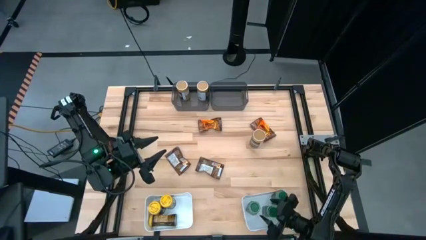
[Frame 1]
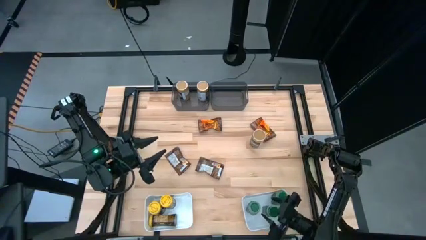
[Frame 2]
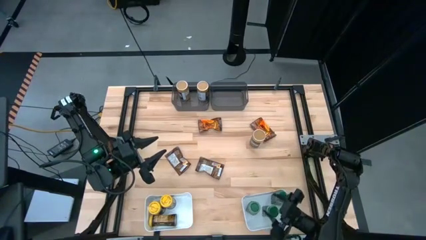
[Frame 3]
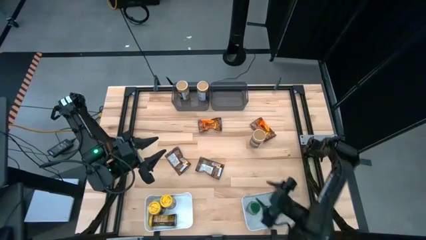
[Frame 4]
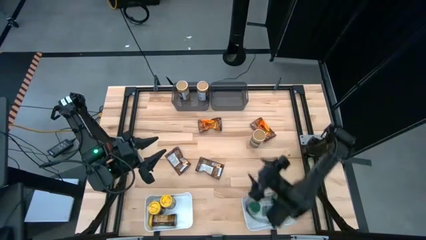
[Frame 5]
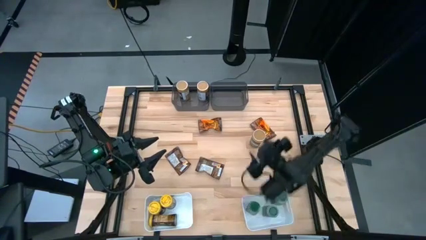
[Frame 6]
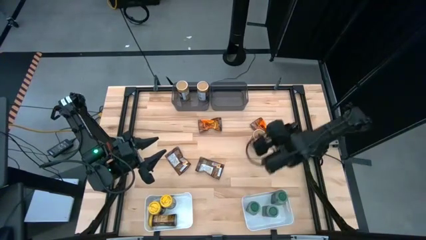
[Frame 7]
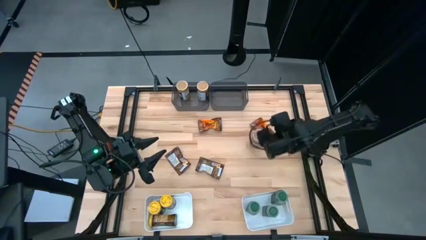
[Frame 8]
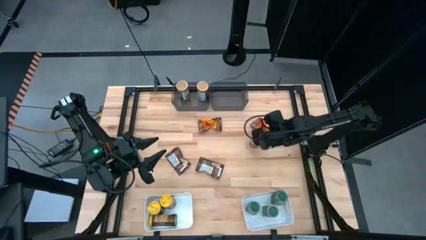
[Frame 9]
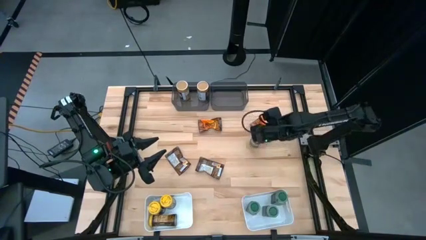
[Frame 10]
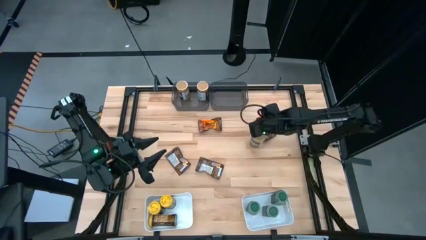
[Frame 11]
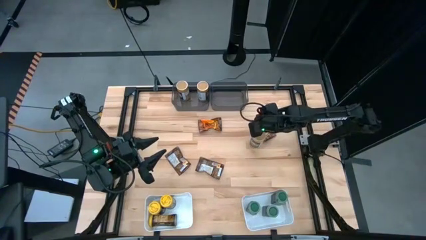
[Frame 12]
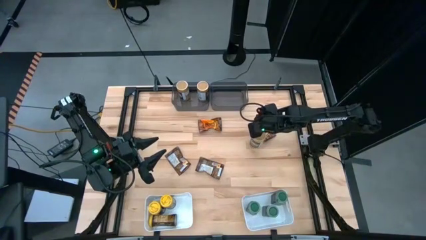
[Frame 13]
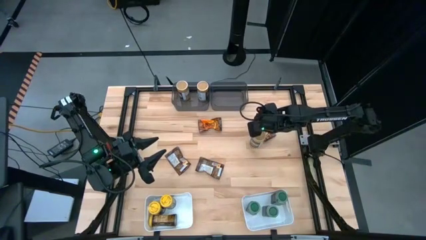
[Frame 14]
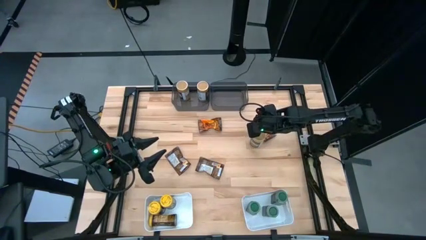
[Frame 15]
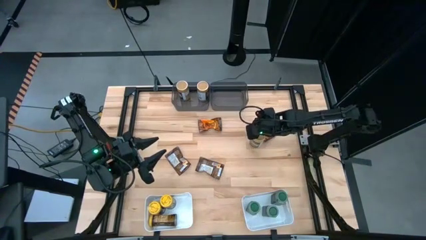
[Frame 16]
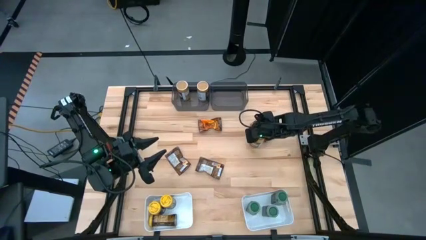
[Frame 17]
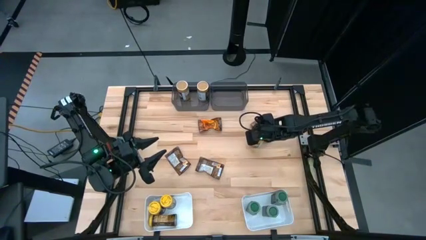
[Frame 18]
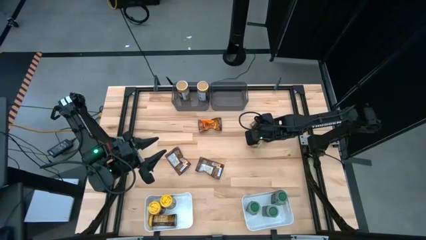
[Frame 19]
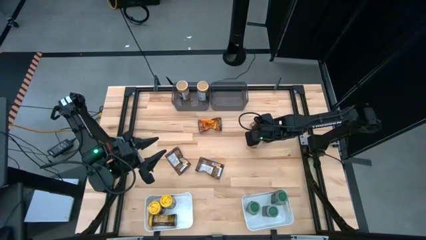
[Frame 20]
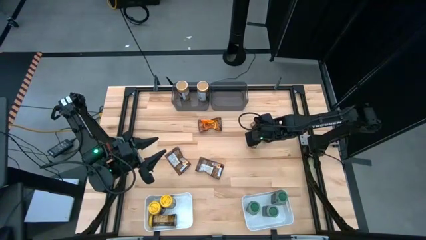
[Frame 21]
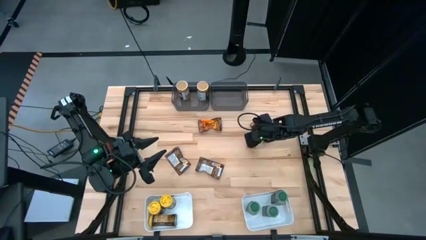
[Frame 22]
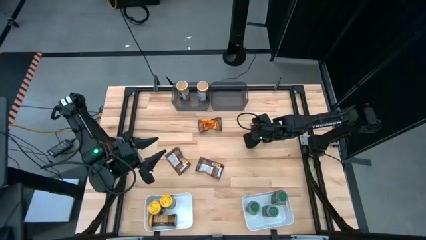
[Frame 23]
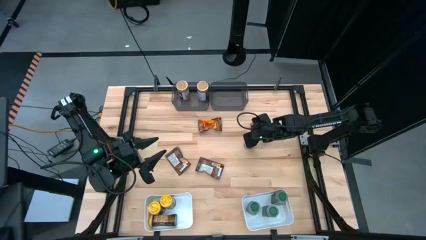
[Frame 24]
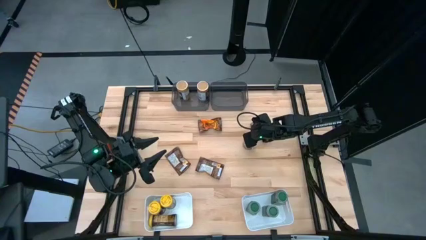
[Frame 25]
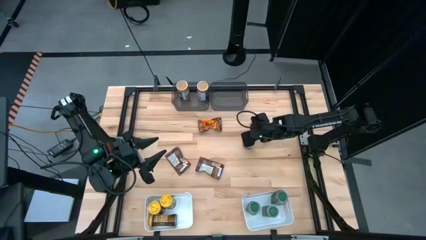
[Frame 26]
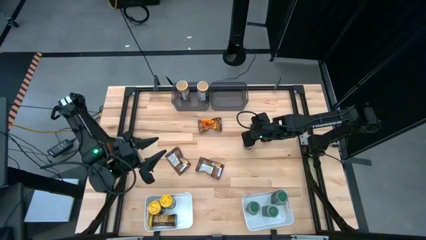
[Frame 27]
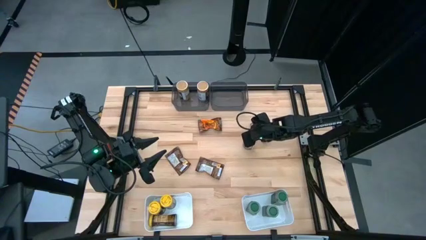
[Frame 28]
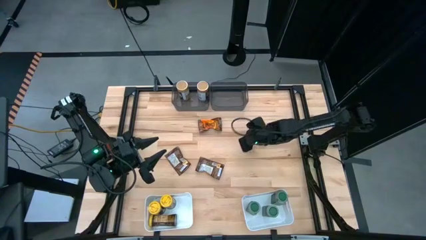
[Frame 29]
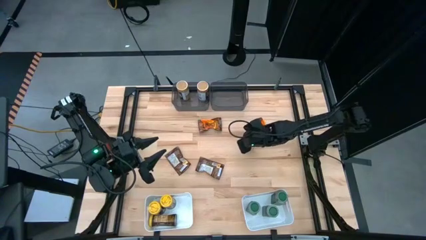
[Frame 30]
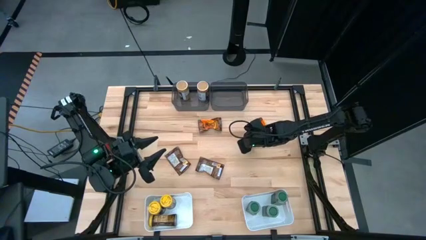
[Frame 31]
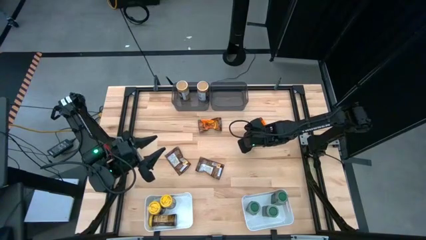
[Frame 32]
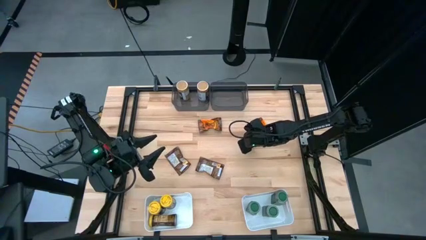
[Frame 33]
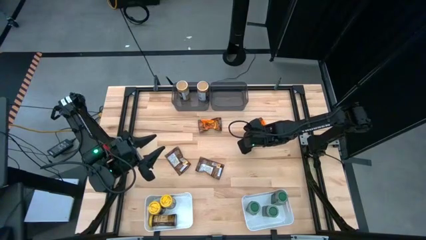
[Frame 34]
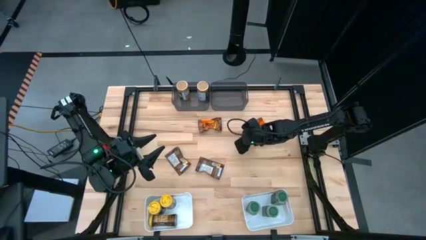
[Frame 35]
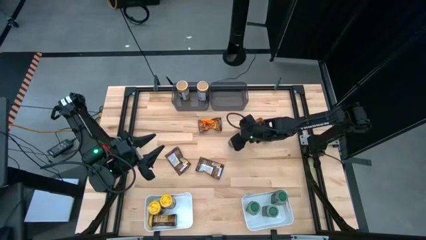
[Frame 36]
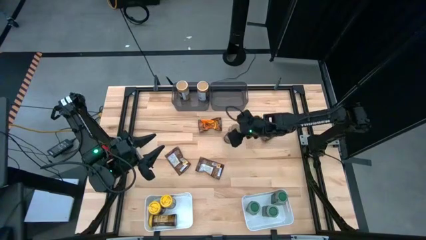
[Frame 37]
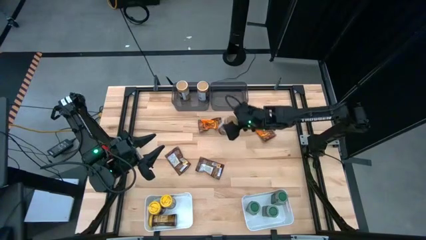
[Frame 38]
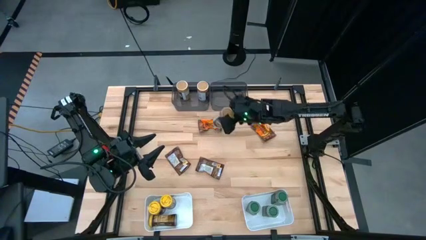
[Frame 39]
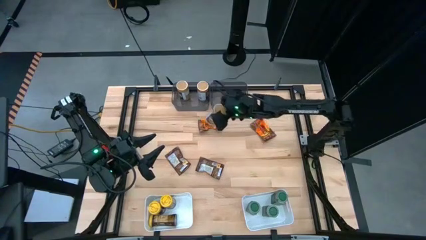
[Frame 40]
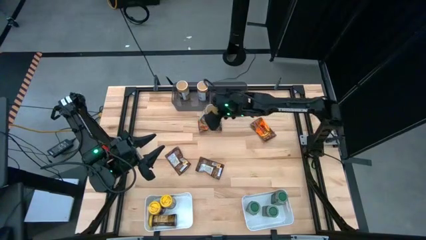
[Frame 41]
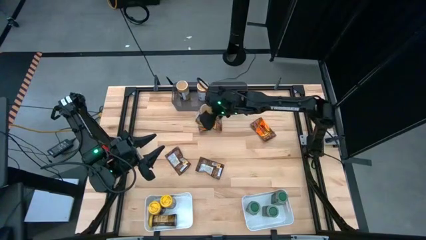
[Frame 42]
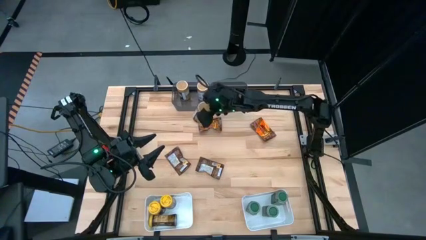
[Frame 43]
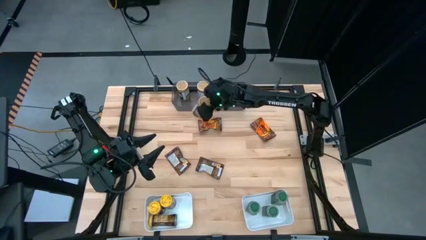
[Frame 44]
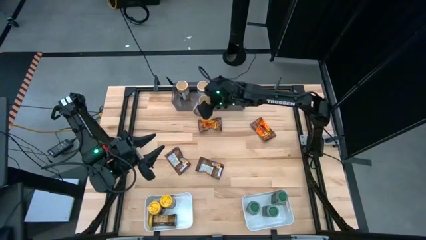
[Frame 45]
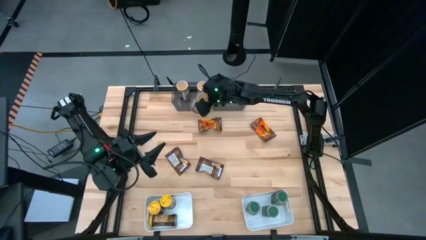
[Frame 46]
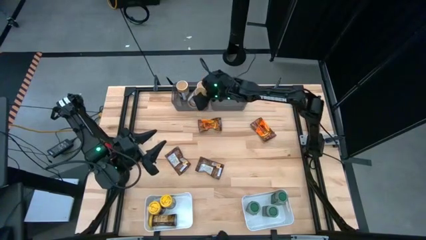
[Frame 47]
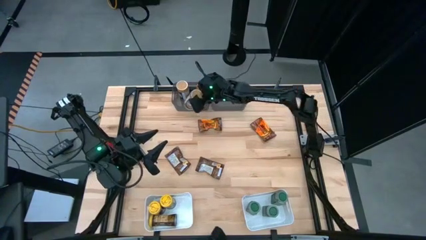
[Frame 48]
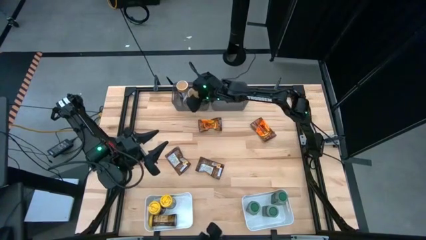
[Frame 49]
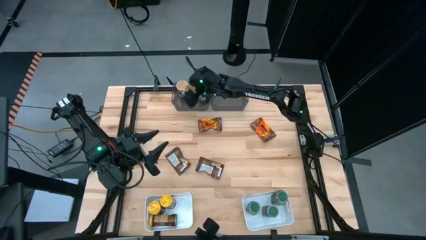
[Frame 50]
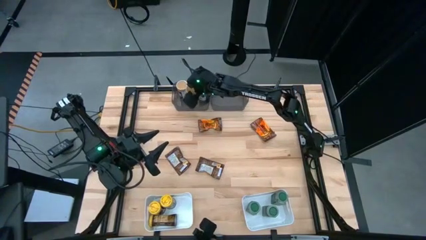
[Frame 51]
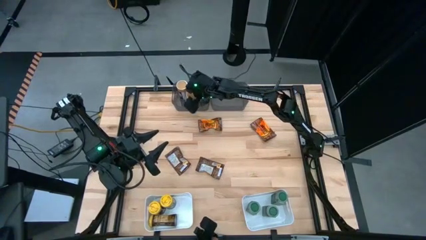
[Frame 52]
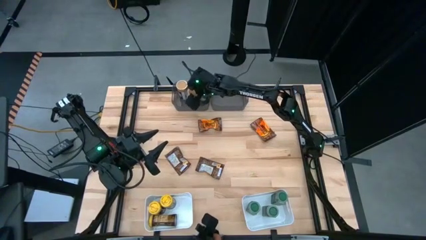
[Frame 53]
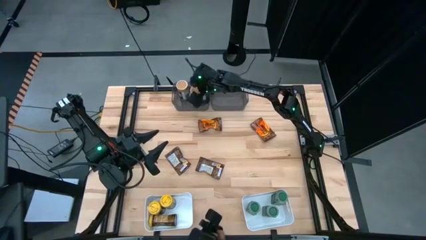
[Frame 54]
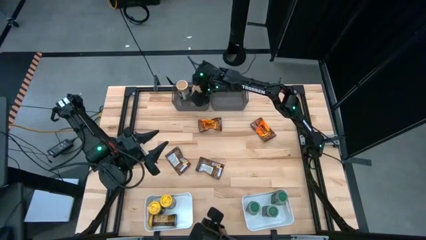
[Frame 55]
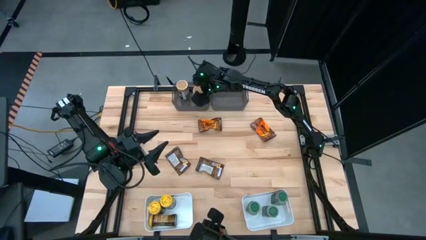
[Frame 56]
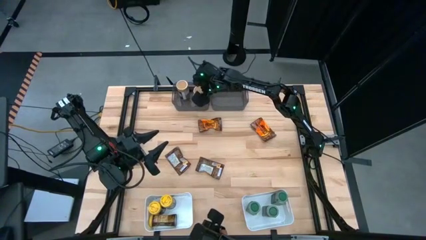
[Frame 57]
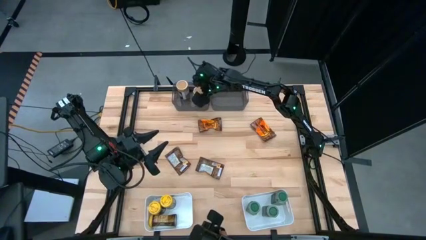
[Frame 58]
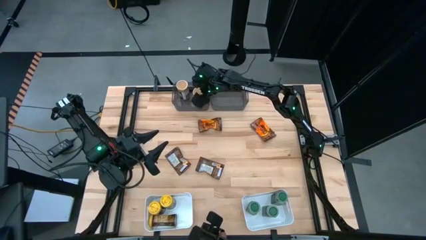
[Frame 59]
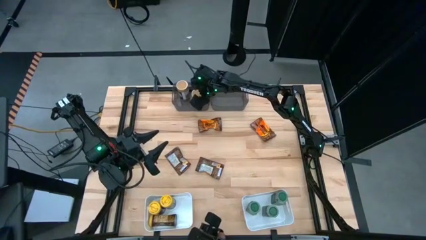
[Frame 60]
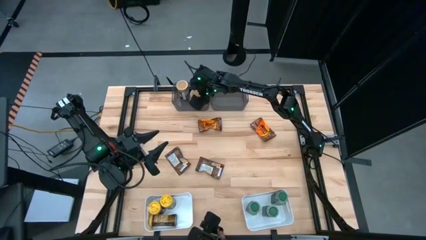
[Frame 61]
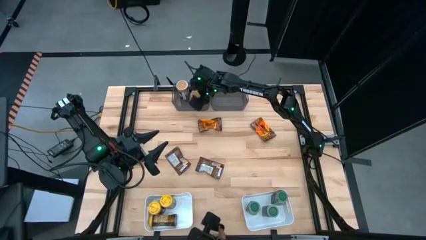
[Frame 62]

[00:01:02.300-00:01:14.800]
Task: Sort spices by type
Put the golden seasoning into the left black bin

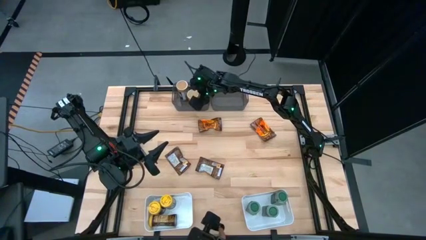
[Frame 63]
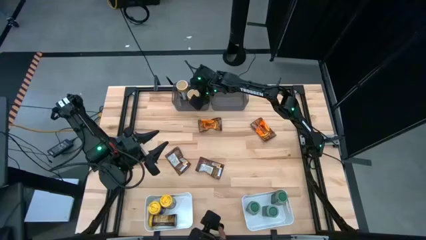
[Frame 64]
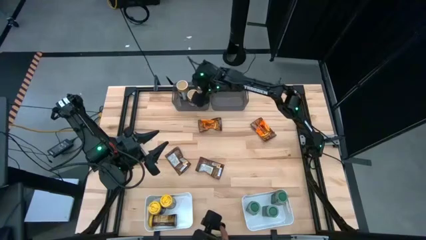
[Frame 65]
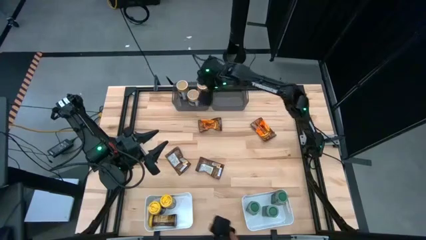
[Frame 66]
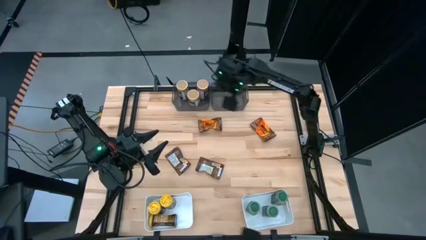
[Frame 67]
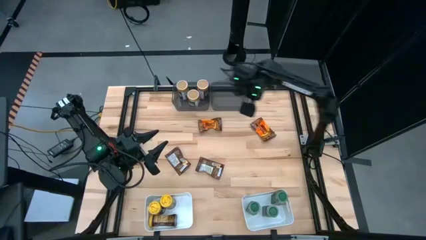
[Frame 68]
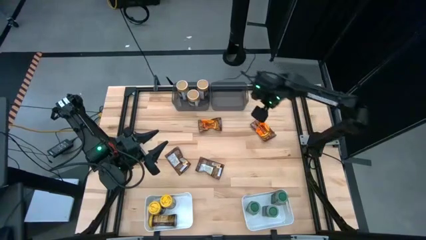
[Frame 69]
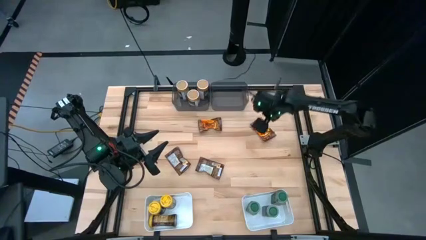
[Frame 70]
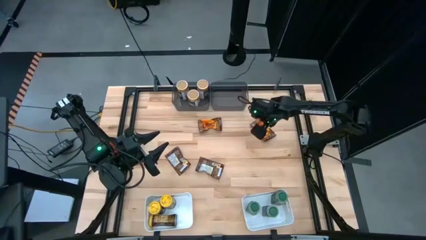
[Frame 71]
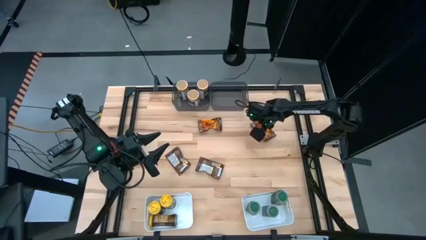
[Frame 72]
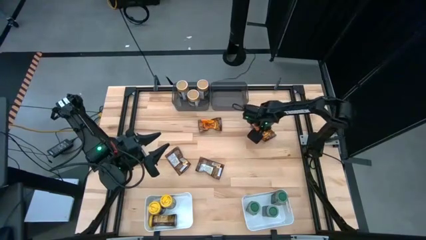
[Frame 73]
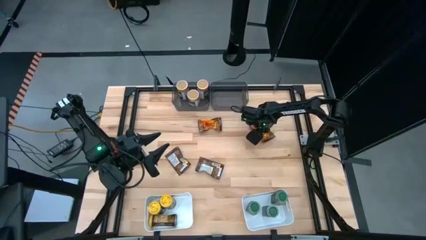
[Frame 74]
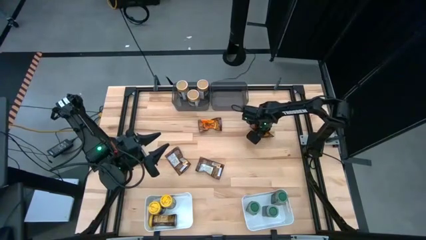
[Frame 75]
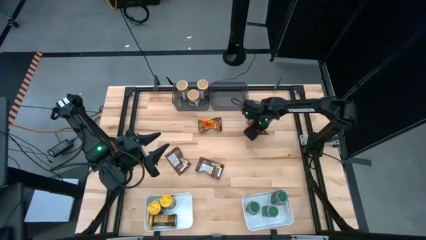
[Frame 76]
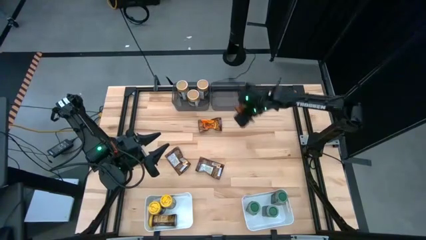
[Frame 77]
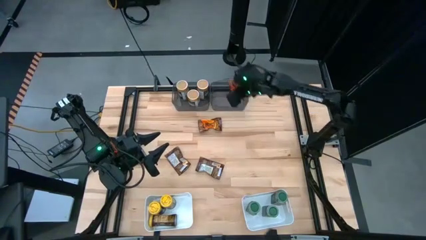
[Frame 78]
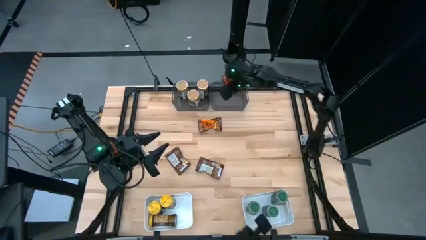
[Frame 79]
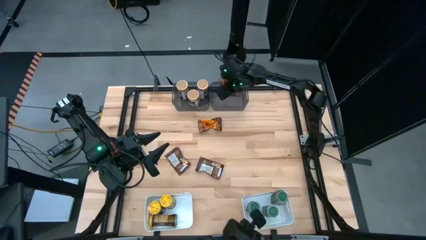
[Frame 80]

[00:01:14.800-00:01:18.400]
Put the top right orange seasoning pack into the right black bin

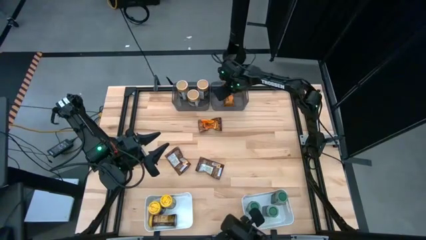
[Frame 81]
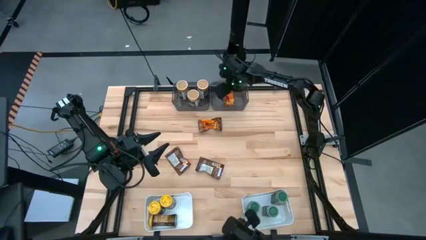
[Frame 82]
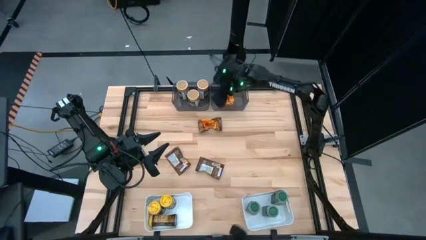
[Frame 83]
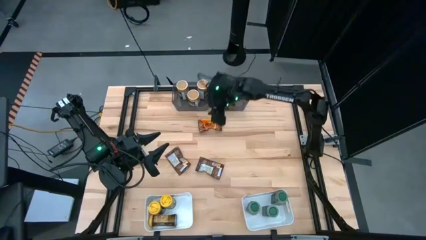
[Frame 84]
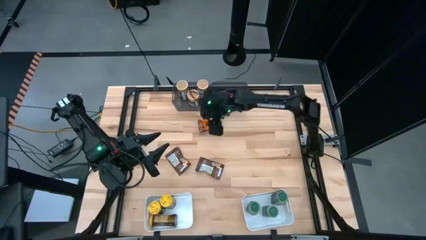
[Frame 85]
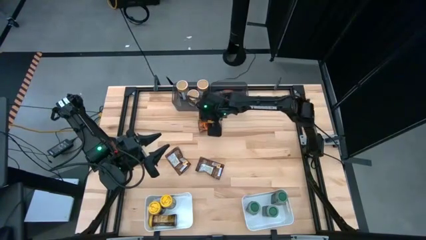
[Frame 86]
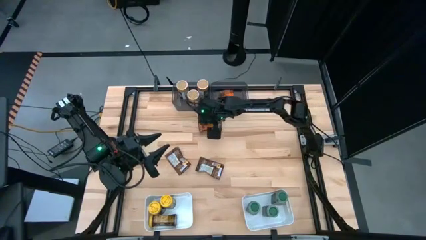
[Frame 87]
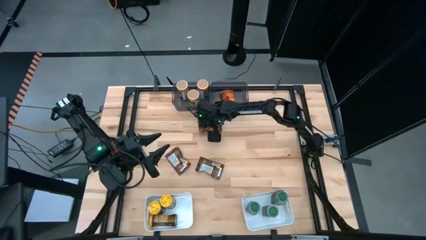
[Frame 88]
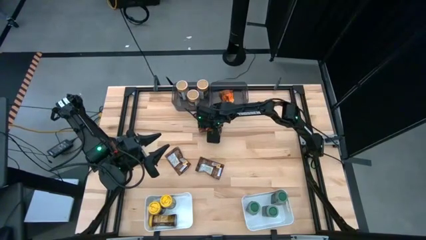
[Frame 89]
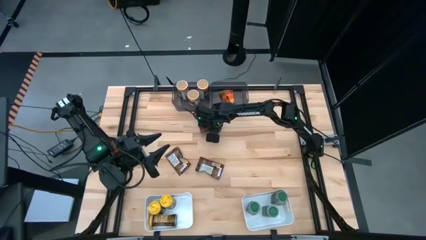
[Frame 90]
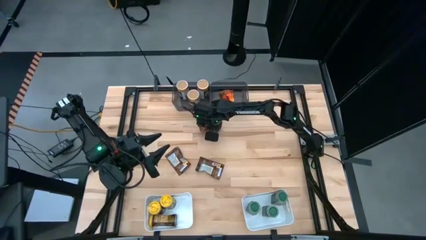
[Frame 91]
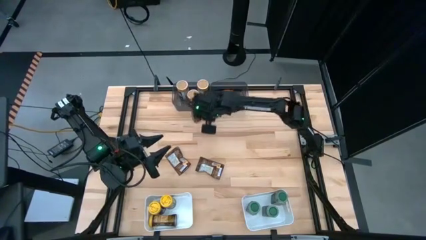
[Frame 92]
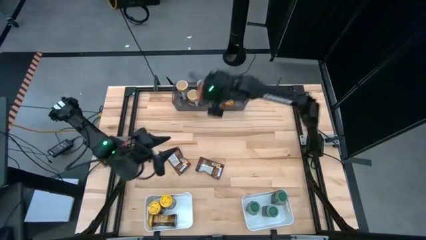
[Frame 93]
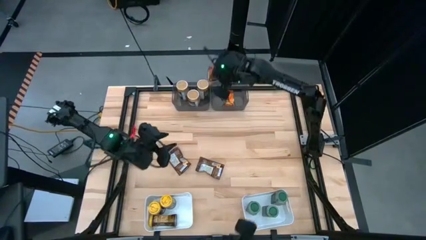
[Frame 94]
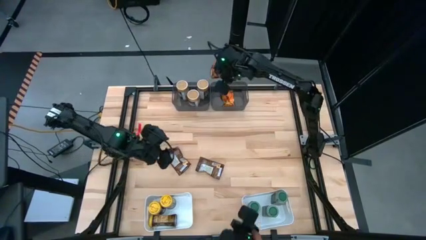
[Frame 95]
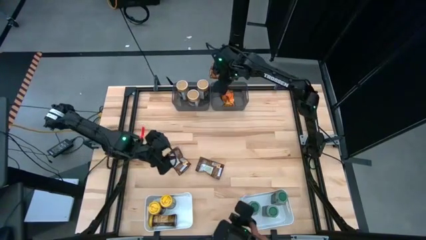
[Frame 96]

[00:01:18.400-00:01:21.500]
Put the top orange seasoning pack into the right black bin
